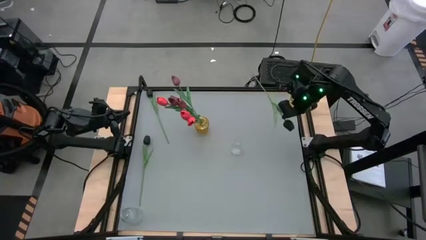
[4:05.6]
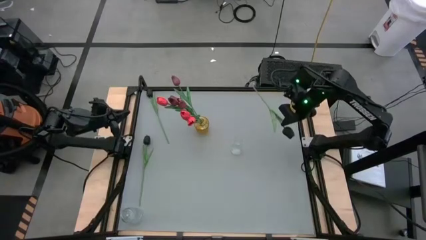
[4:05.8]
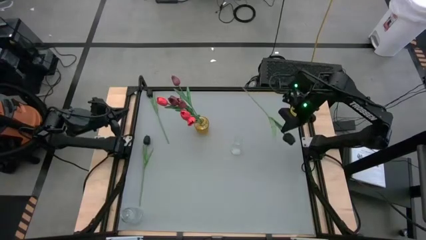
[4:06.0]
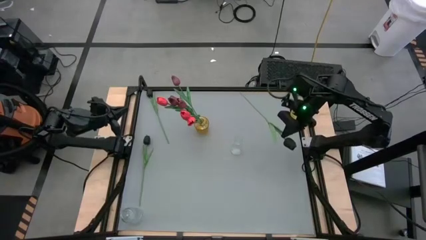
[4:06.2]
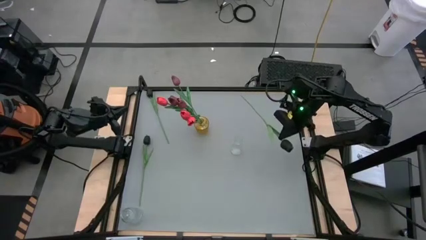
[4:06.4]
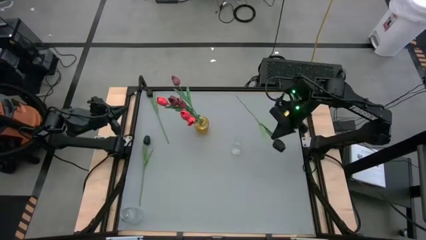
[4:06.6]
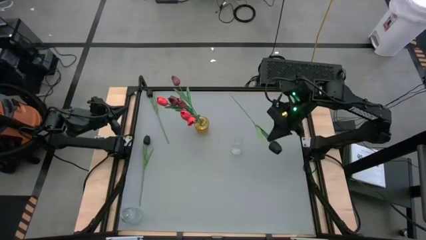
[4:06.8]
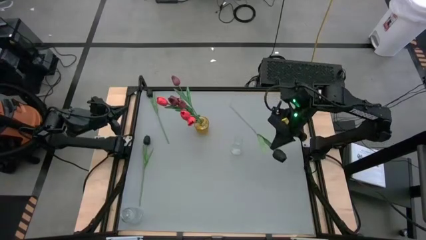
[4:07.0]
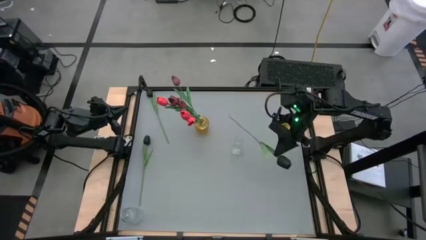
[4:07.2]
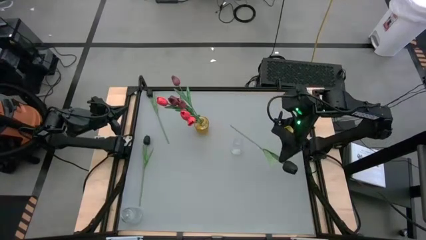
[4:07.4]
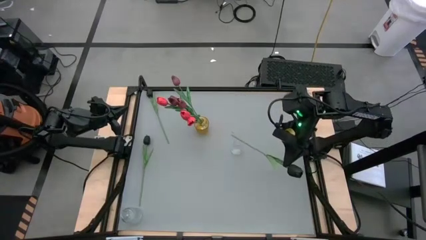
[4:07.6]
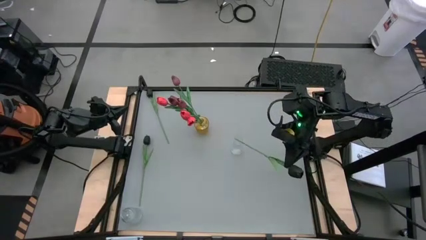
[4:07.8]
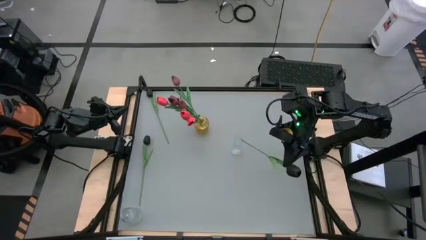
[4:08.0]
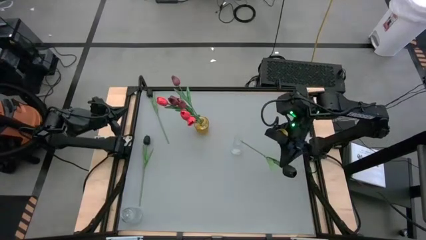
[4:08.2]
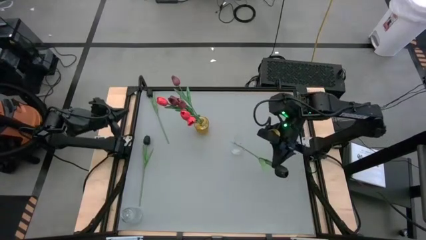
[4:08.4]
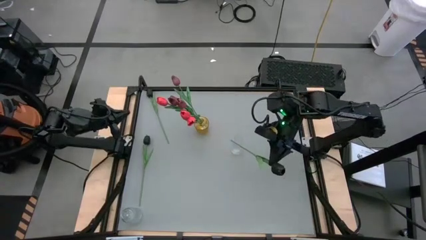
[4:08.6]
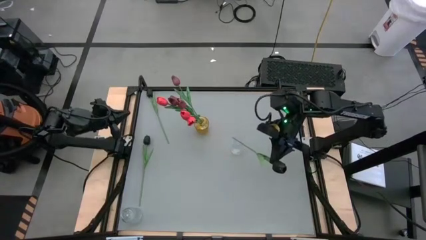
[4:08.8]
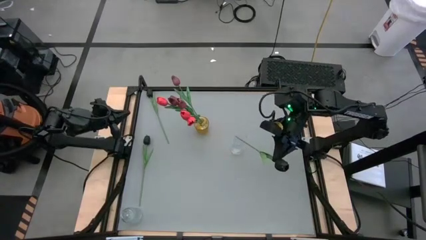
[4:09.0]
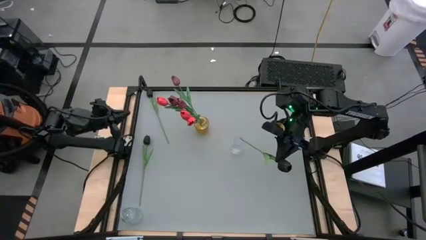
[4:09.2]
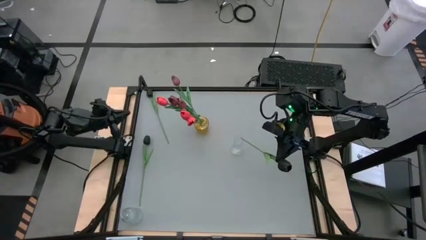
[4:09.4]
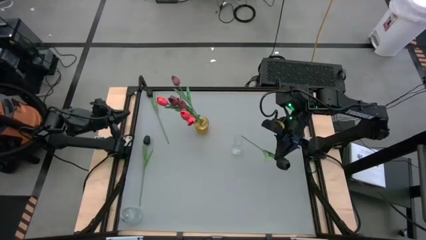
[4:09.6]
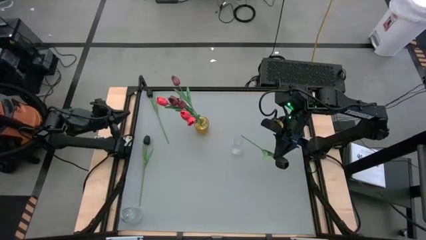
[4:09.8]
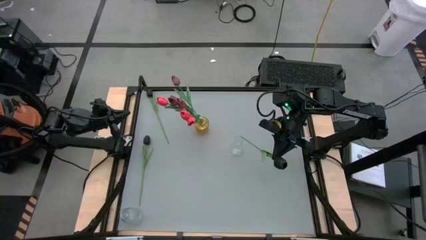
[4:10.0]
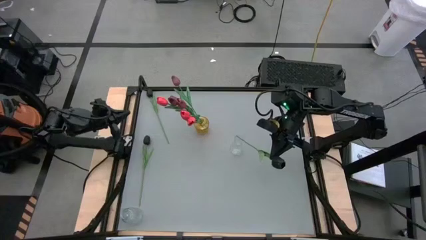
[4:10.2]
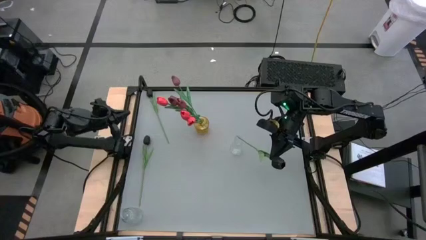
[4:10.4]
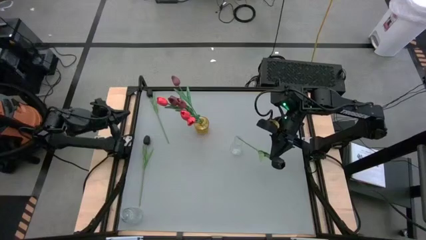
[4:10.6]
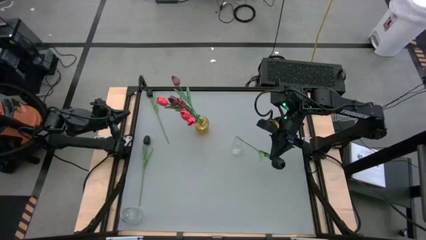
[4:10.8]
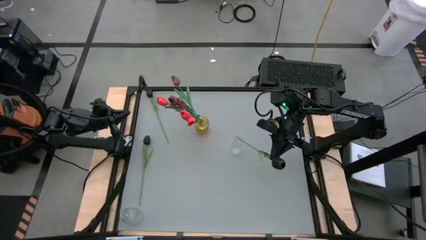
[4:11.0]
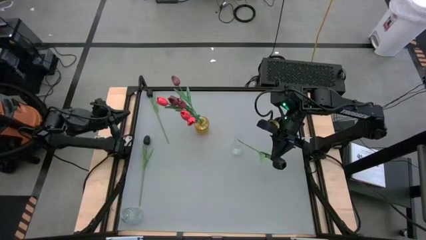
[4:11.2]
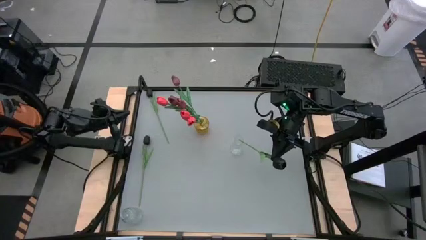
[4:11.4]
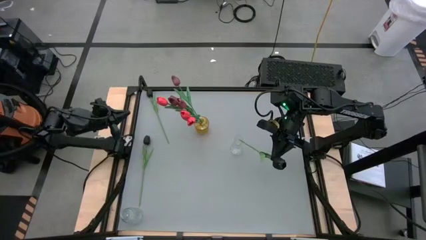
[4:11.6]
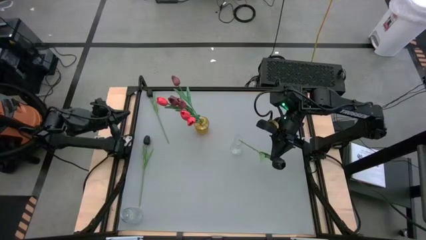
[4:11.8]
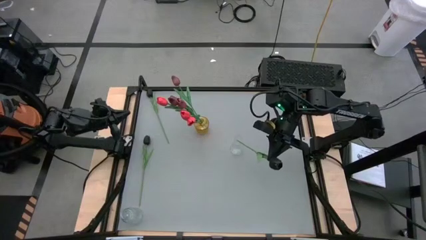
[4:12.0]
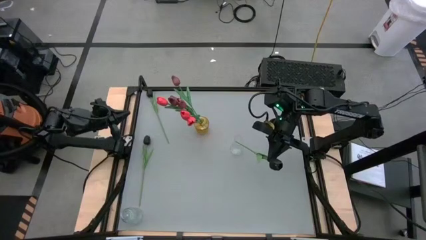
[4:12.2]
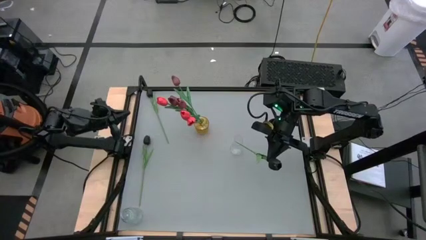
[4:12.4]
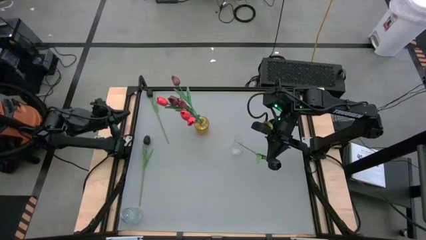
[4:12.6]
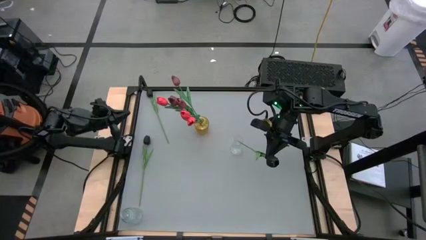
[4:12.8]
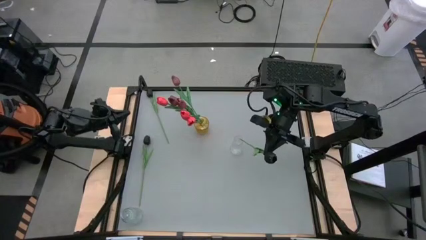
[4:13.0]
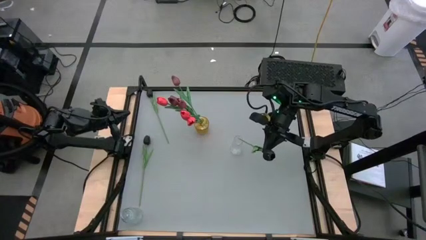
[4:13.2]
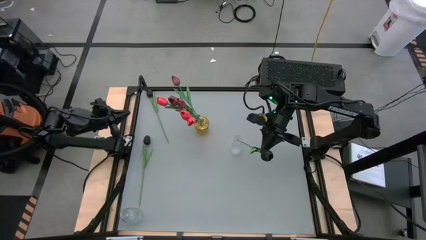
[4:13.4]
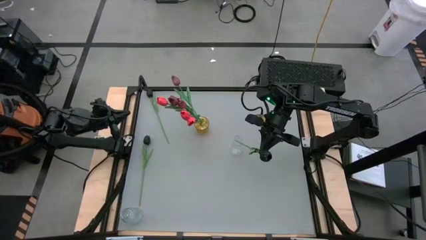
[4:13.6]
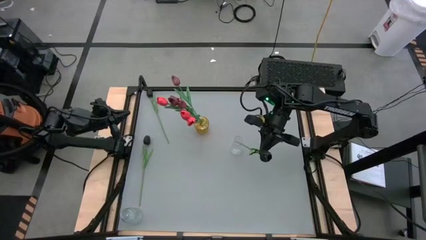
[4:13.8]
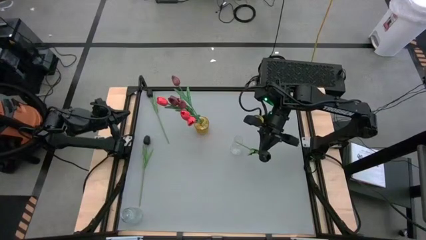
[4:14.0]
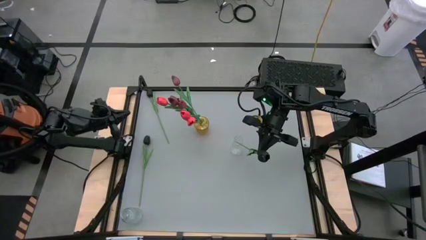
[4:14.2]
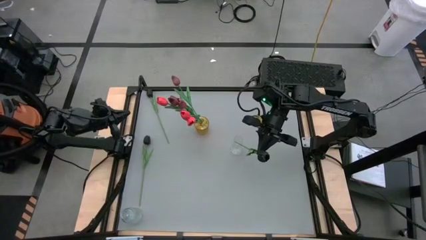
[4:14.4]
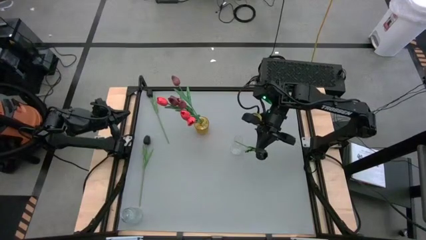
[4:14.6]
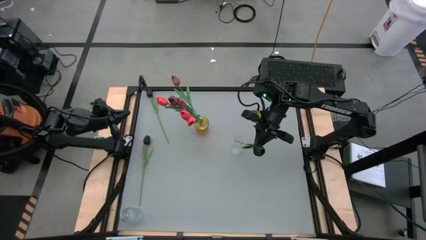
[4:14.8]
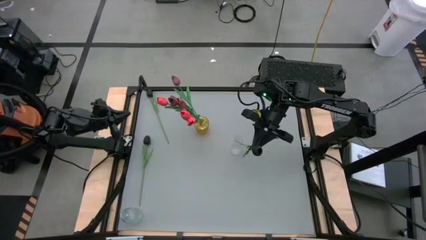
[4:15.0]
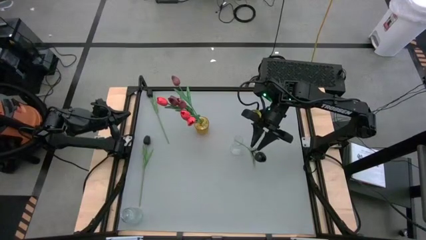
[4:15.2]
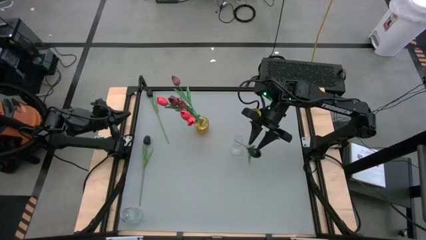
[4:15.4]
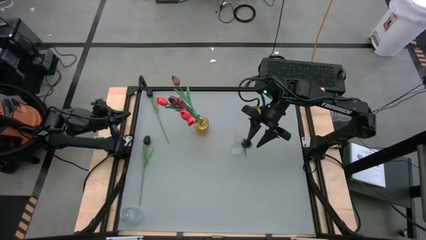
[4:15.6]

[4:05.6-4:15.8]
Task: Sort flowers into vase by color
Put the top right black flower into the transparent vase
